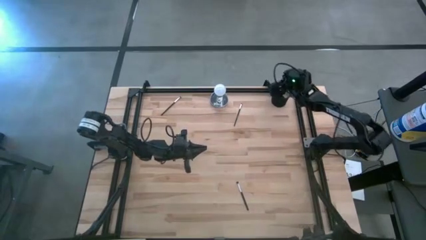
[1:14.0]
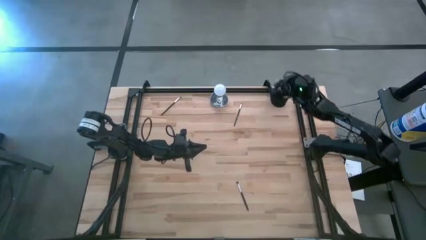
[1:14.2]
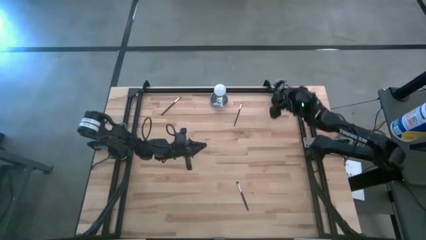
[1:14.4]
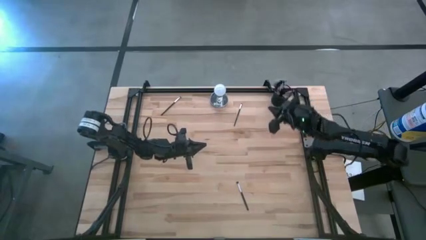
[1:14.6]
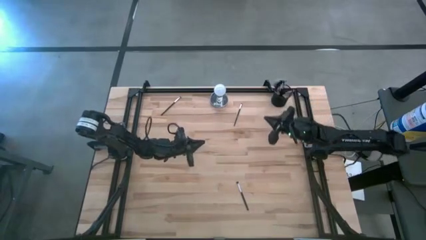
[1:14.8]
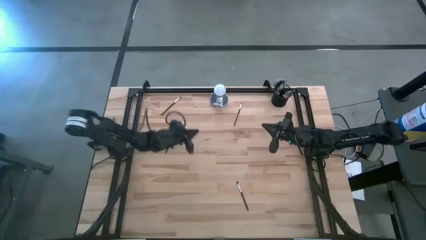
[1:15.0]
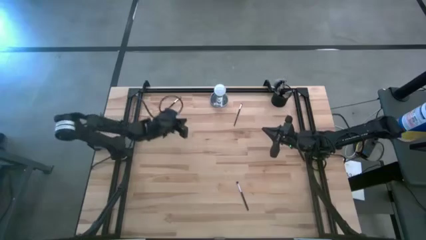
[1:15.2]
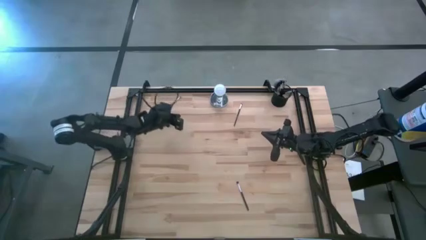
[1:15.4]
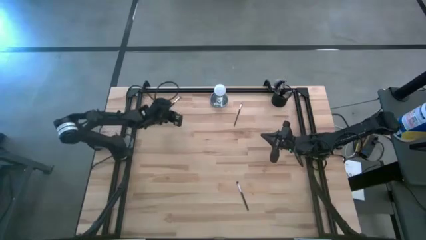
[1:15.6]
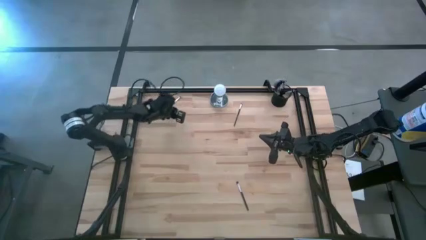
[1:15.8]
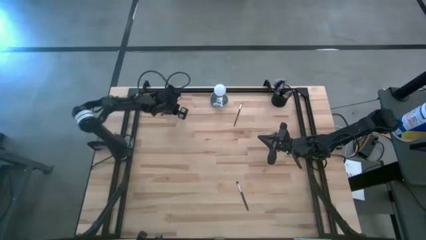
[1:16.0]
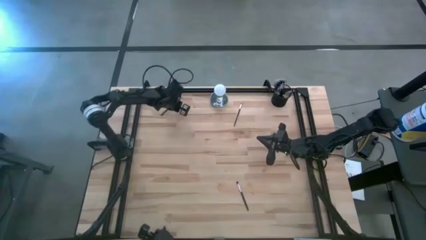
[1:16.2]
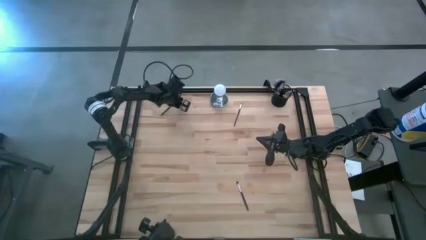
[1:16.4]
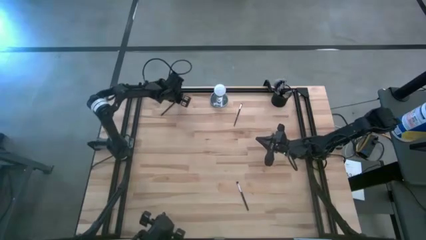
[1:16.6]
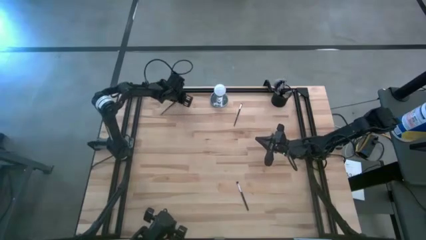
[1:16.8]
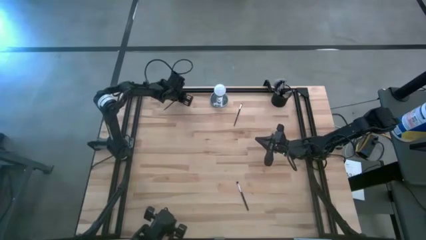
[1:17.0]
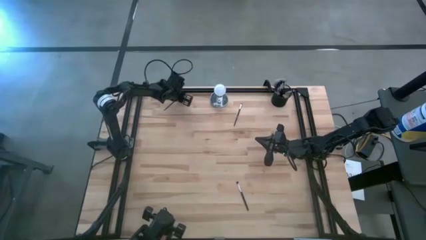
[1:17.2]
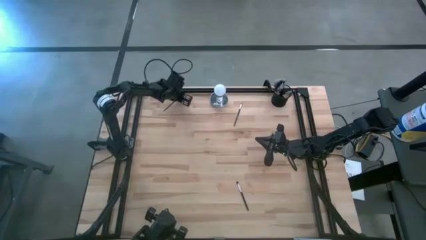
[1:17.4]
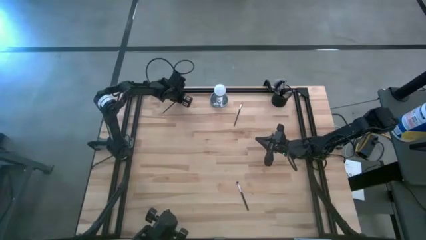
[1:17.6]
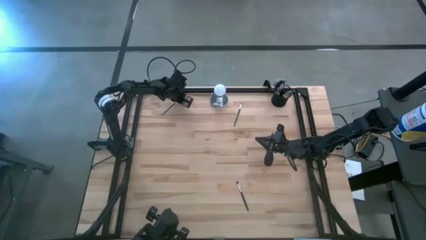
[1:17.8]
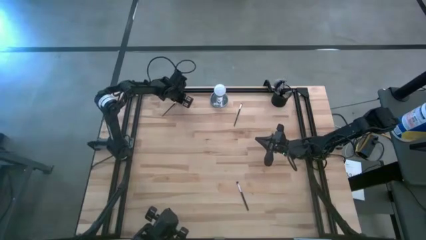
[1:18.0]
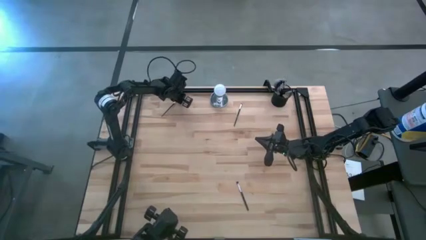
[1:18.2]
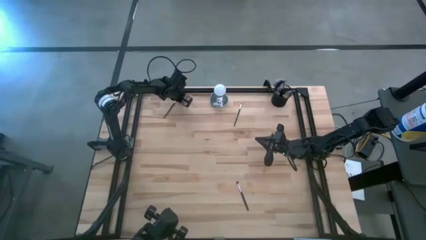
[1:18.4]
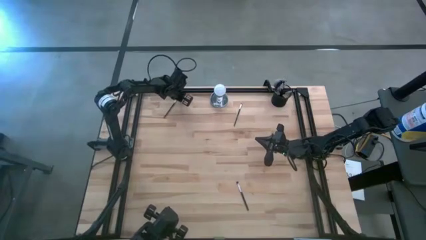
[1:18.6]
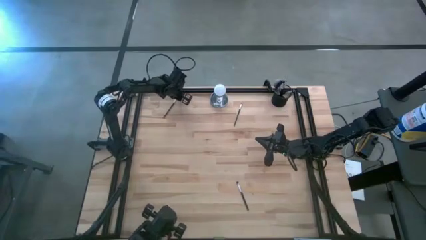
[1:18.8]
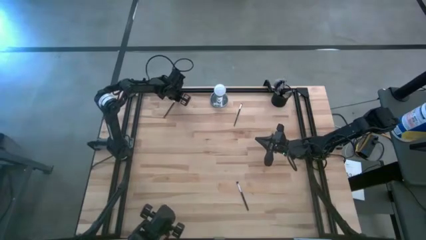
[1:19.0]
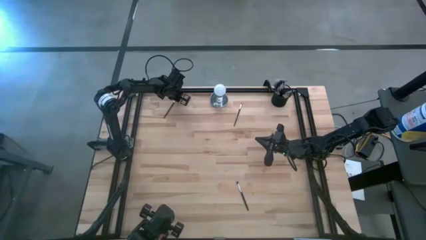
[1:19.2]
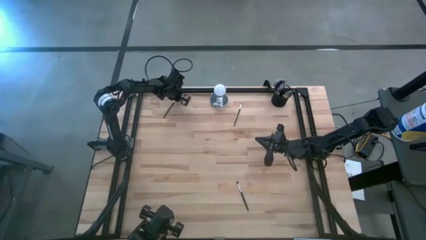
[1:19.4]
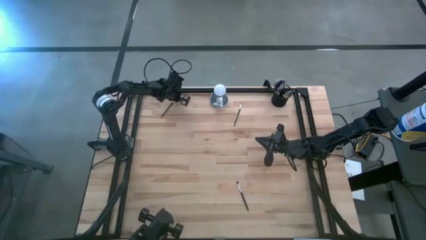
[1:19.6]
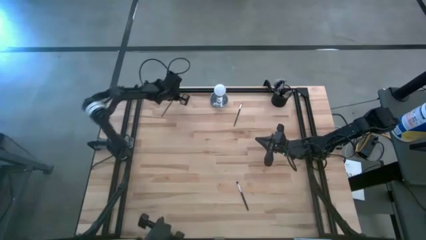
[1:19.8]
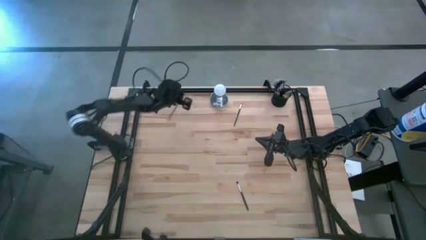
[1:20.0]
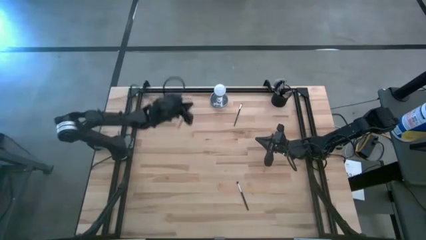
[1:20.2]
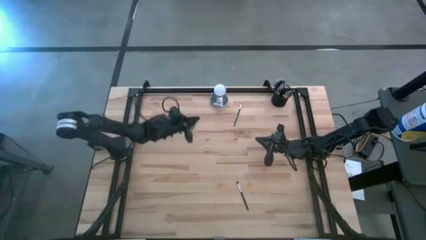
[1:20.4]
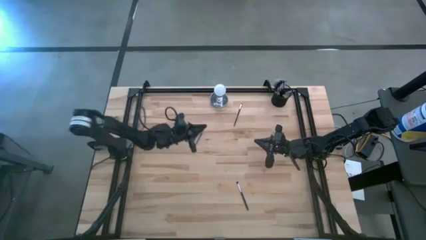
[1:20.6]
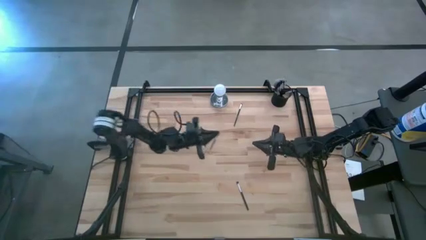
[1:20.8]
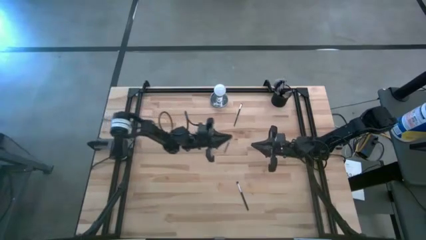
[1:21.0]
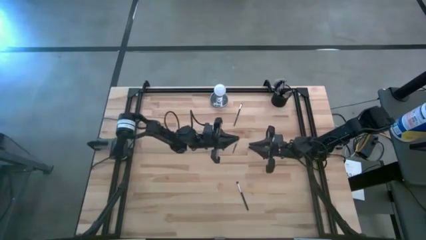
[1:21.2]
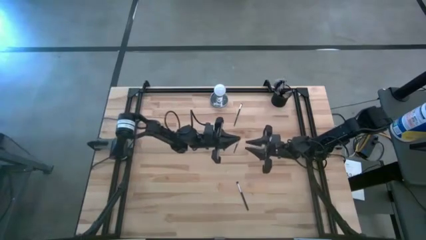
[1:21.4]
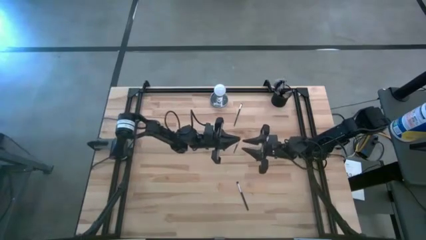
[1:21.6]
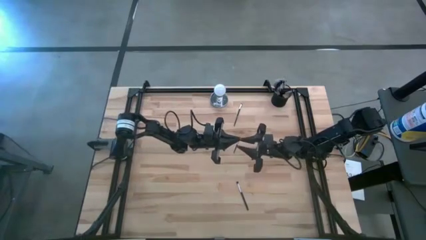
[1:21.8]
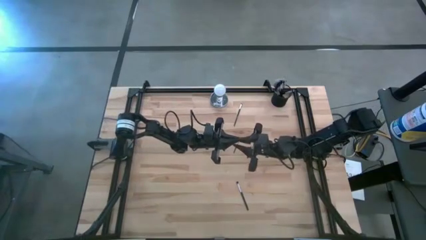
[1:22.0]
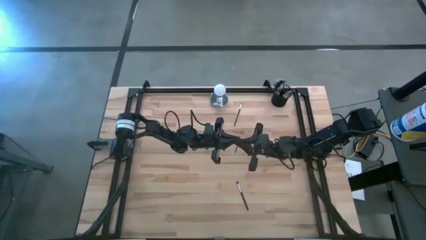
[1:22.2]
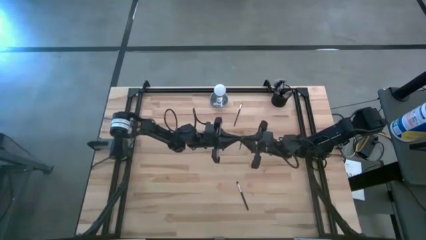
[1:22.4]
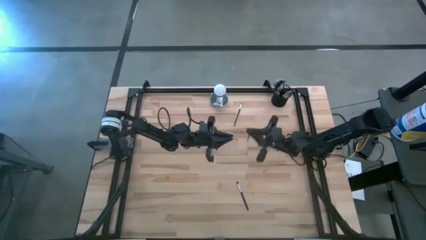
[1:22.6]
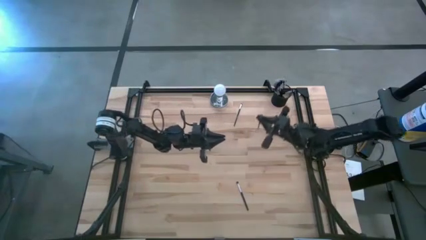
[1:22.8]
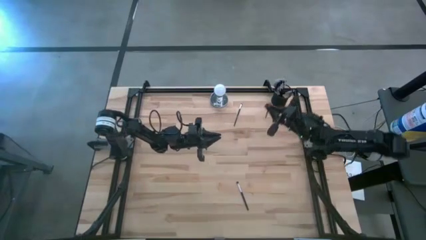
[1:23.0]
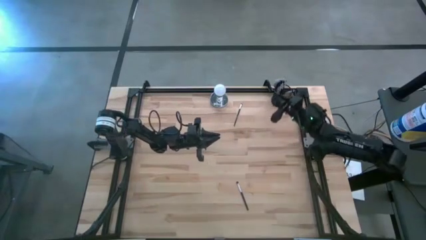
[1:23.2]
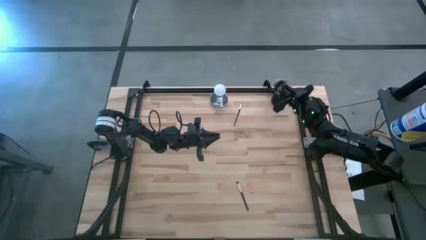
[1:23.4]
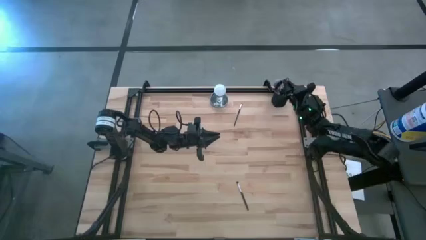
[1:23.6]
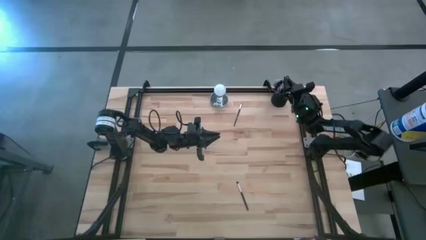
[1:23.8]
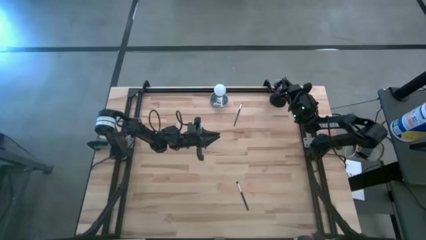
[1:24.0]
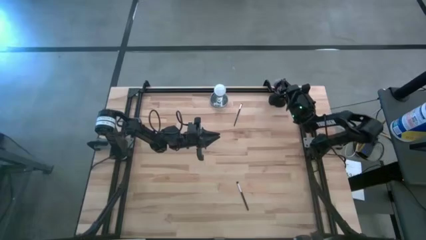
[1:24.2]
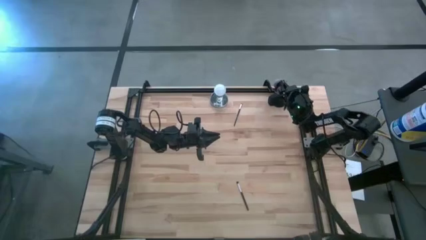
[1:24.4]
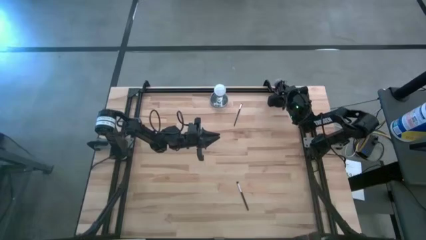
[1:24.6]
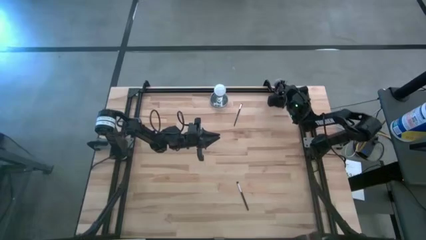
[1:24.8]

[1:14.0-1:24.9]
Task: Pick & Place Makeup Supplies
Put the makeup brush into the makeup holder

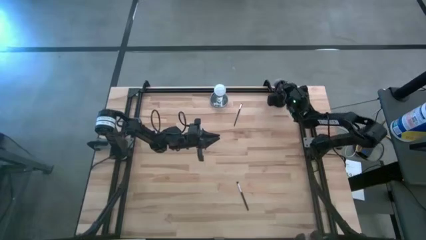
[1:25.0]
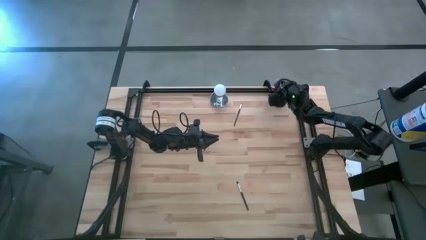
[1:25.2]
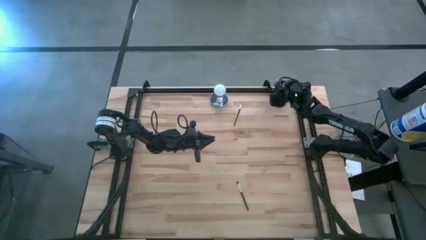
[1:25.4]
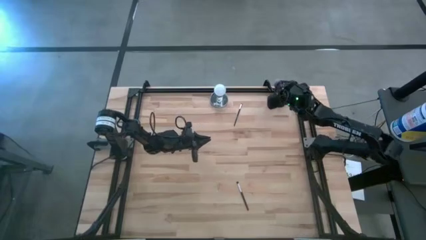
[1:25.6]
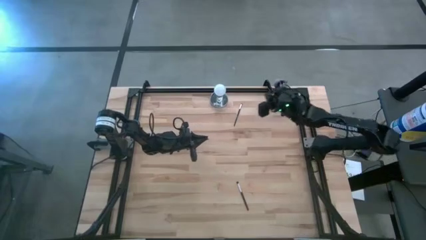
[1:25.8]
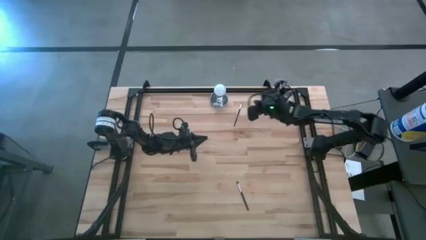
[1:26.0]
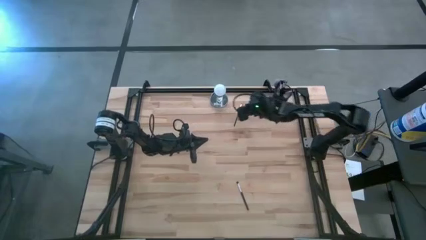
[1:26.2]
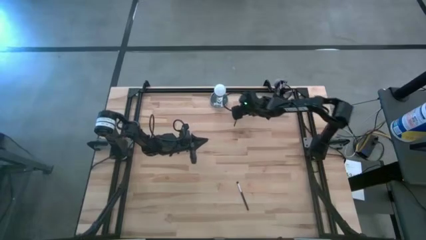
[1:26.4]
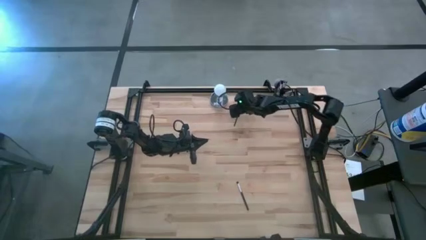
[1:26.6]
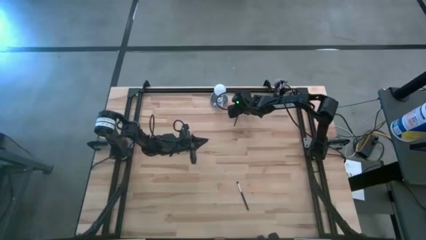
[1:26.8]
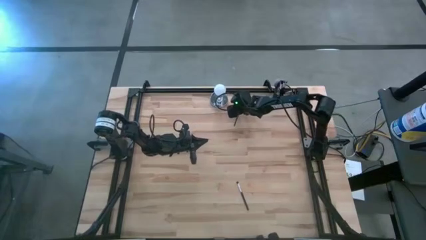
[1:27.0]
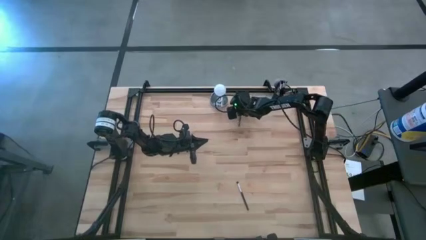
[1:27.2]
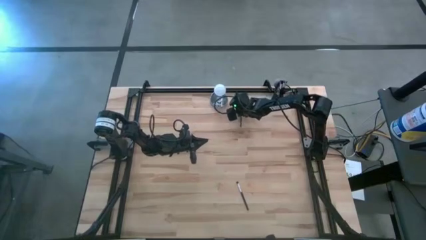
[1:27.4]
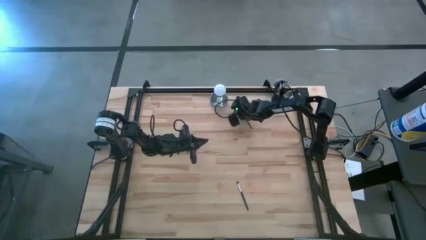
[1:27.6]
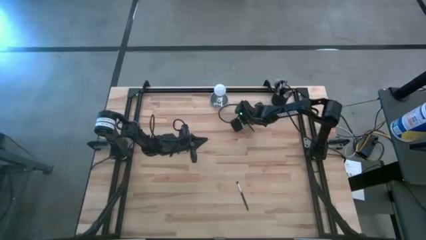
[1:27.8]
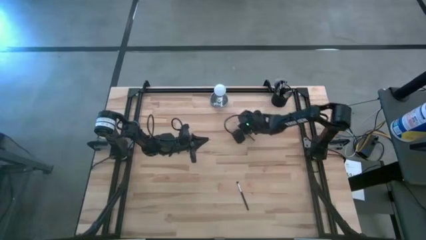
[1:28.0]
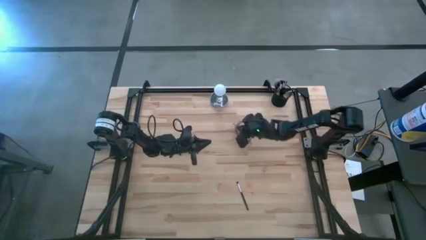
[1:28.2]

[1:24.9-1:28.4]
Put the makeup brush into the makeup holder
